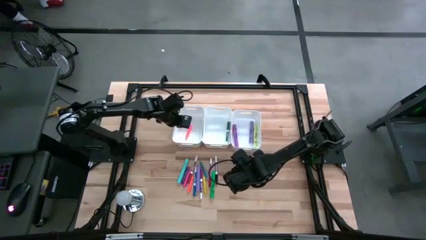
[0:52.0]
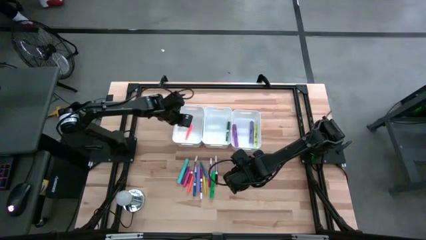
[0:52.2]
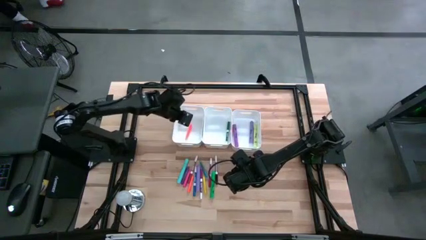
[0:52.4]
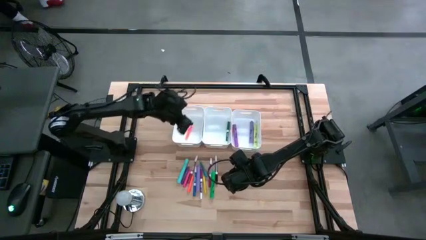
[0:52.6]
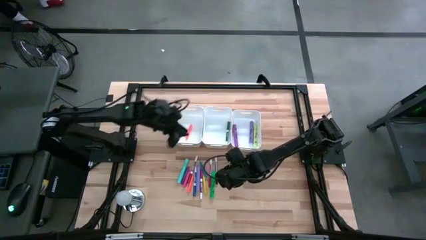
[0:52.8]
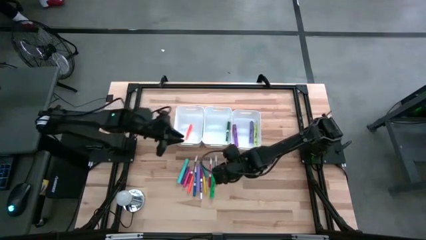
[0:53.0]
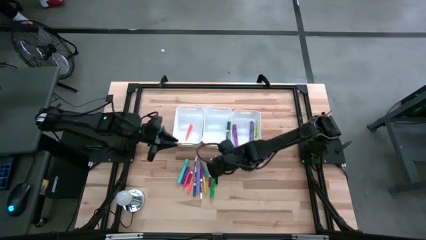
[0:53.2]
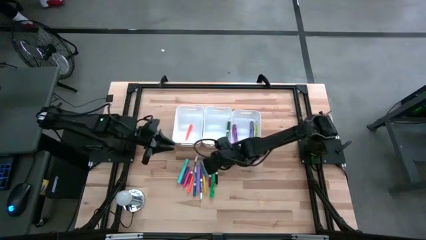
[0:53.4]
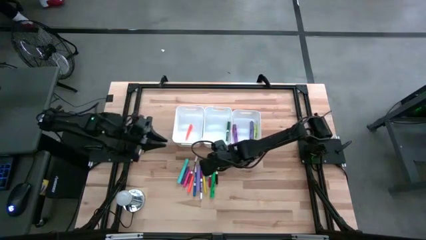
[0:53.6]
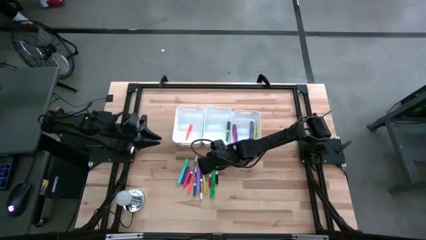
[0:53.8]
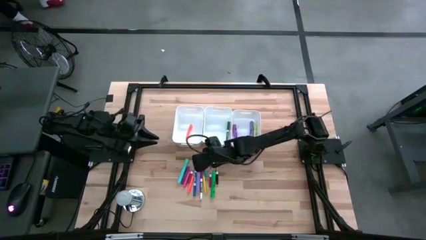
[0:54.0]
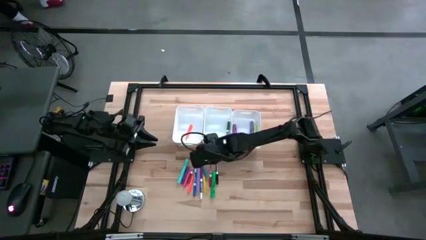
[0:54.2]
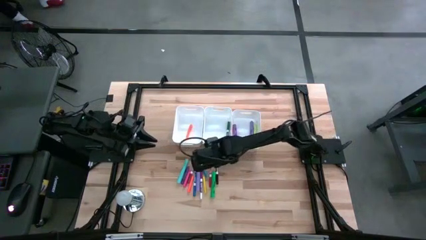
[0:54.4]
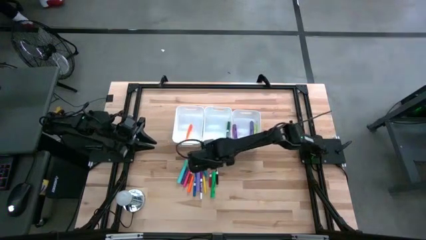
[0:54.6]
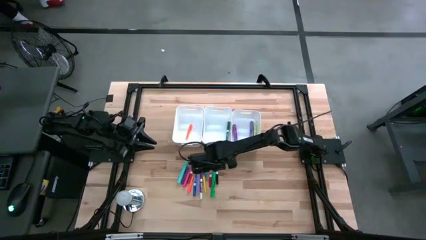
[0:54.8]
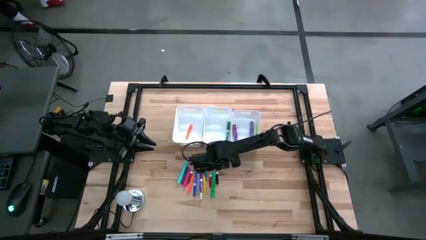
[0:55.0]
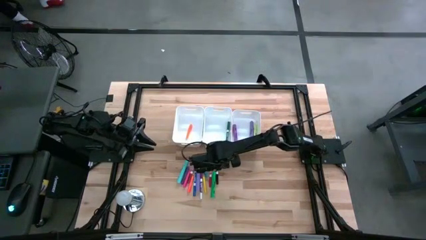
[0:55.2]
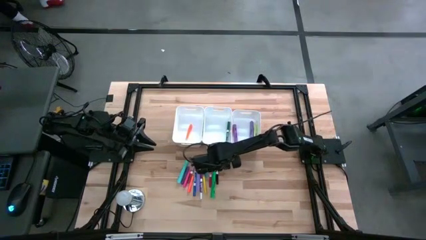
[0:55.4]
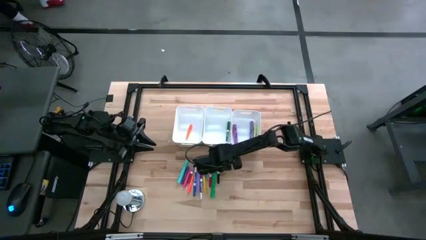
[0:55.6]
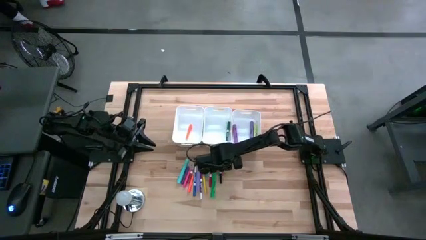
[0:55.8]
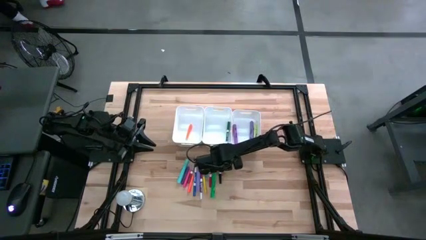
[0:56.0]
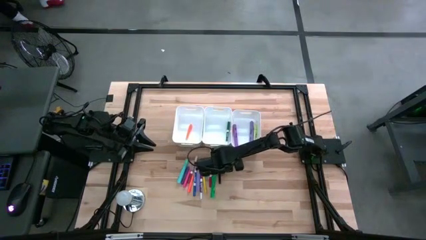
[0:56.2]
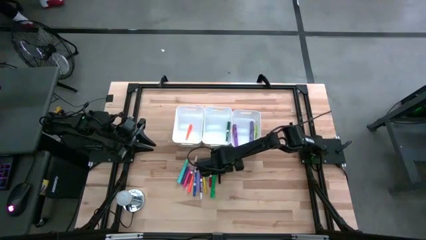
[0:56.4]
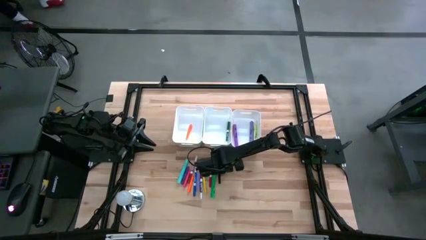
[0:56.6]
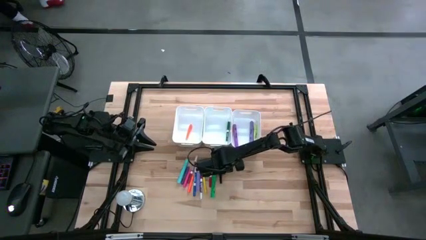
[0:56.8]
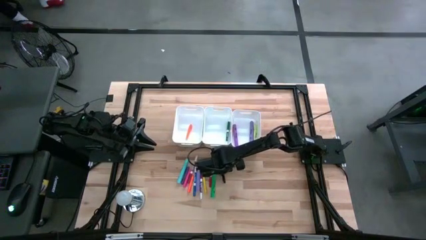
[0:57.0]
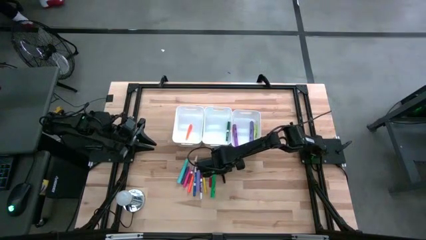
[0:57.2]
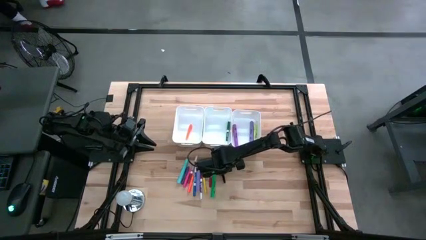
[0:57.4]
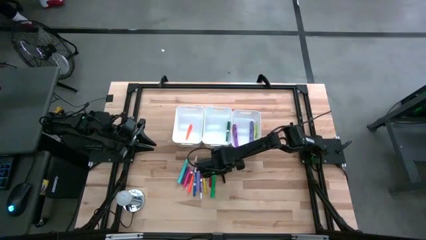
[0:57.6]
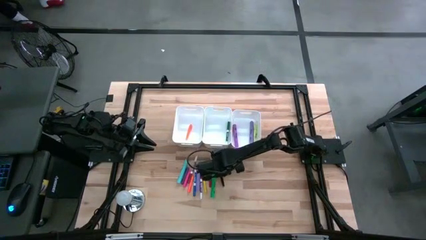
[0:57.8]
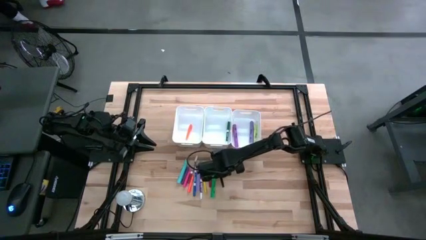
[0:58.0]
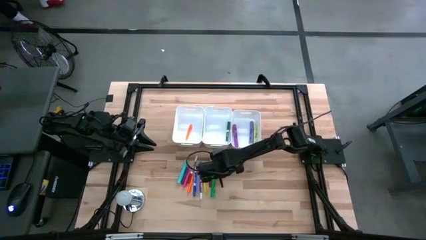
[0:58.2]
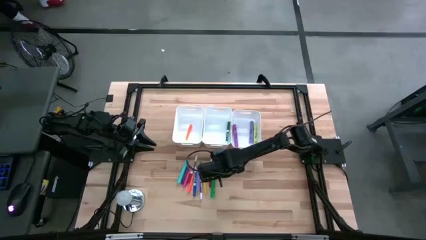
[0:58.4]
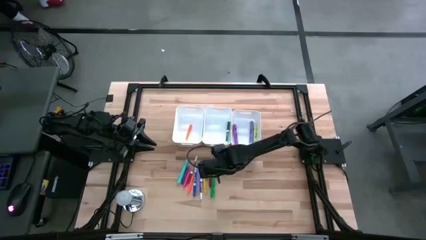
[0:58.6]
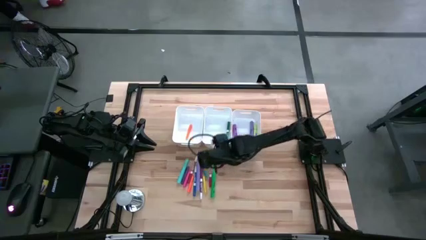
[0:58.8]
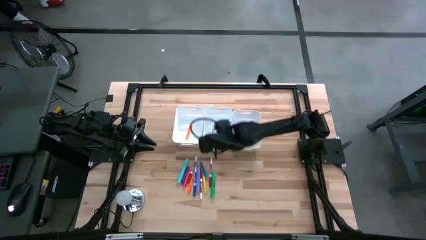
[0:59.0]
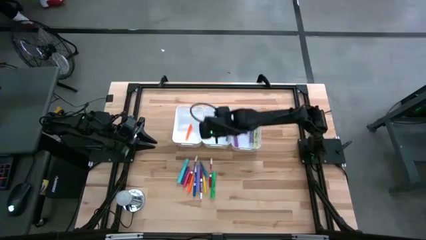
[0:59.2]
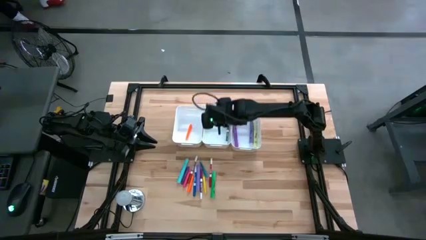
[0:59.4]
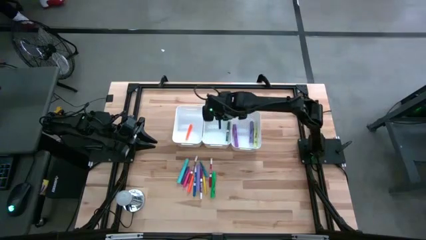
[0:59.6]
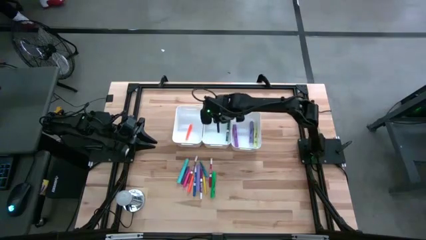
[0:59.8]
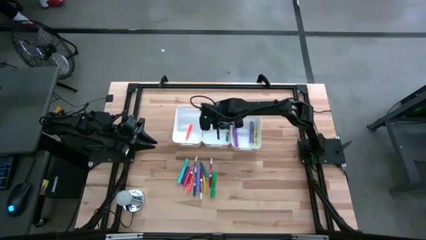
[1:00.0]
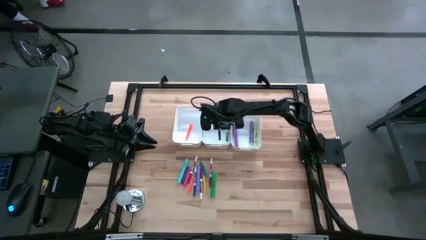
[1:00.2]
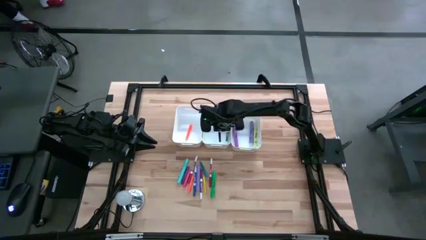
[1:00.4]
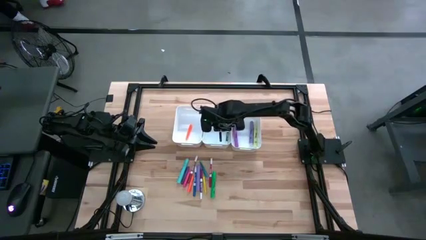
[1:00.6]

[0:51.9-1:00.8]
Task: Pick & Place Markers
Put the black marker into the middle white bin

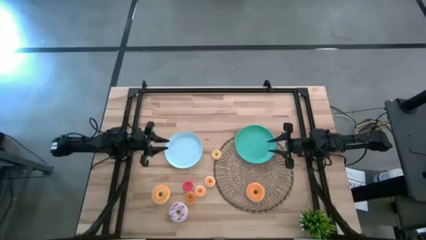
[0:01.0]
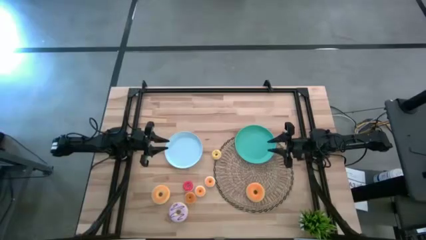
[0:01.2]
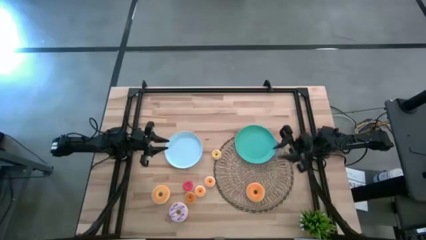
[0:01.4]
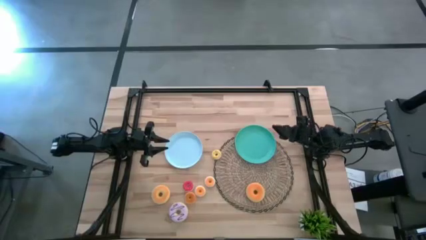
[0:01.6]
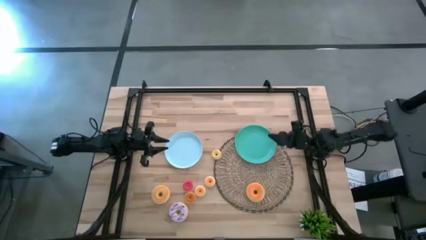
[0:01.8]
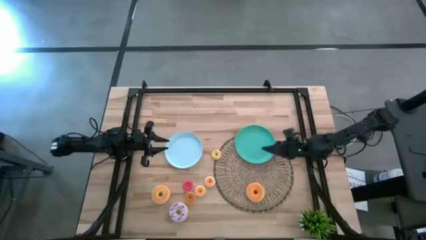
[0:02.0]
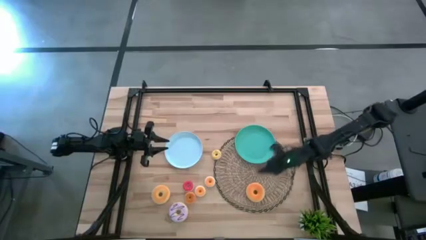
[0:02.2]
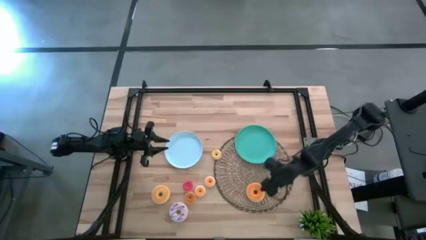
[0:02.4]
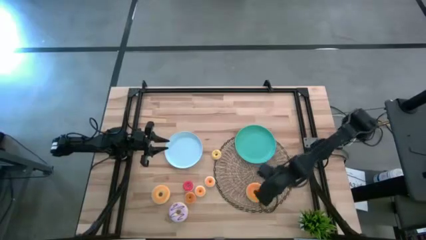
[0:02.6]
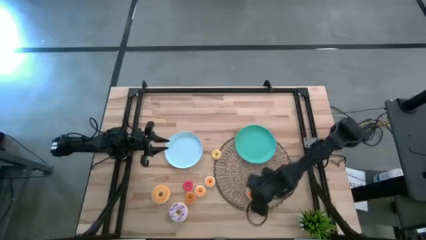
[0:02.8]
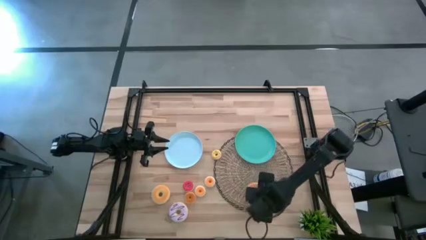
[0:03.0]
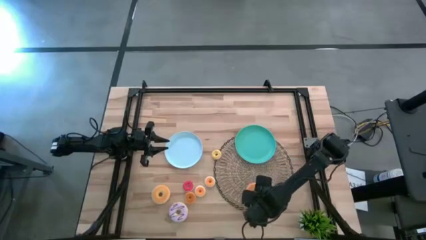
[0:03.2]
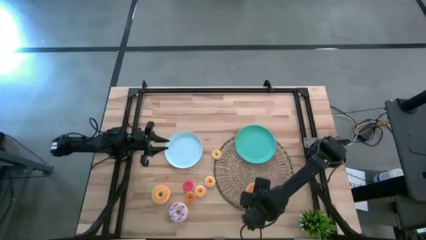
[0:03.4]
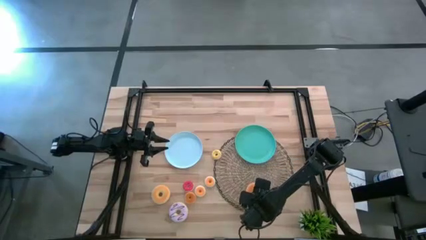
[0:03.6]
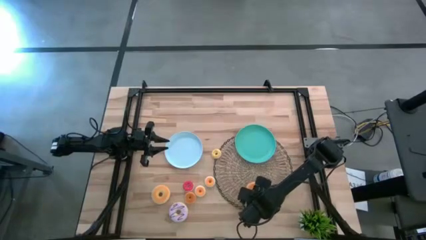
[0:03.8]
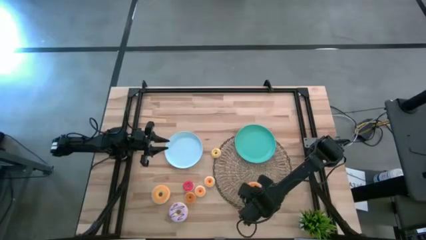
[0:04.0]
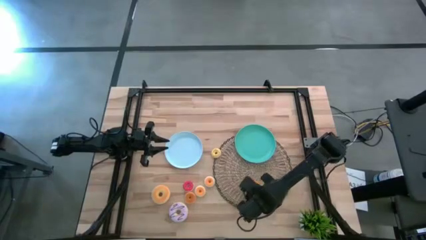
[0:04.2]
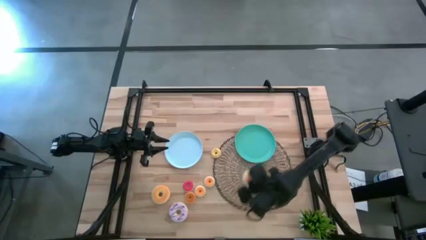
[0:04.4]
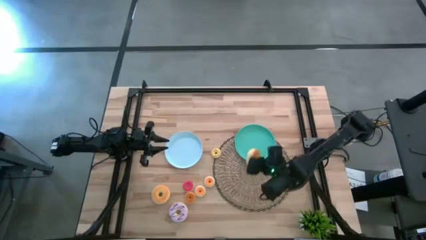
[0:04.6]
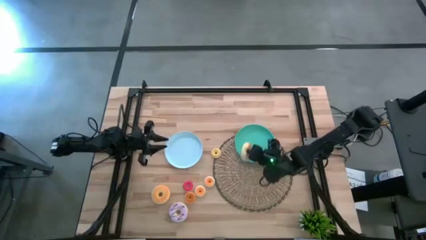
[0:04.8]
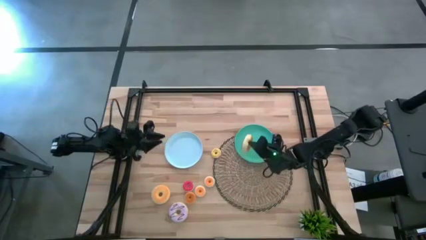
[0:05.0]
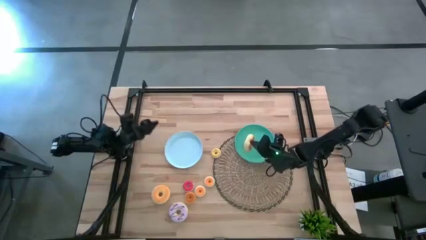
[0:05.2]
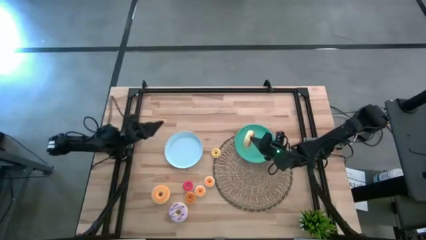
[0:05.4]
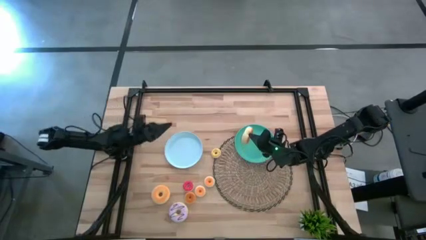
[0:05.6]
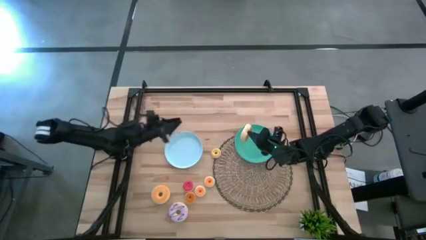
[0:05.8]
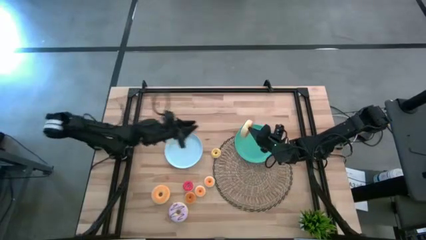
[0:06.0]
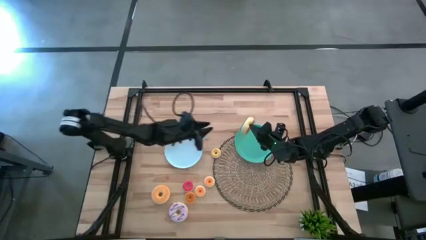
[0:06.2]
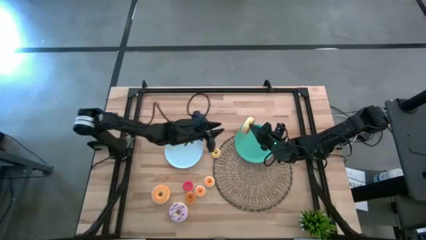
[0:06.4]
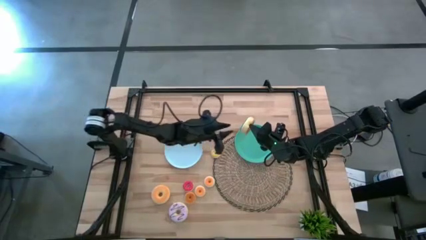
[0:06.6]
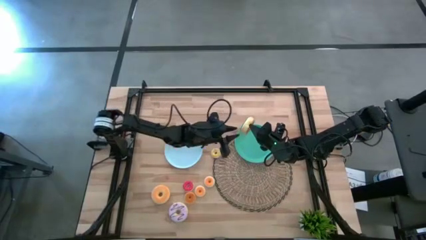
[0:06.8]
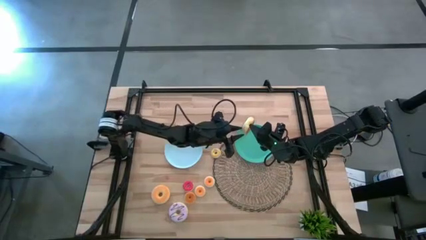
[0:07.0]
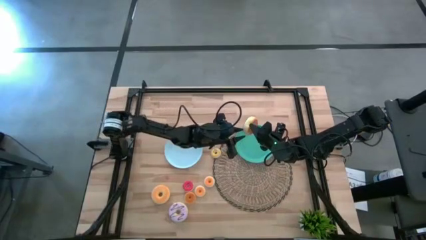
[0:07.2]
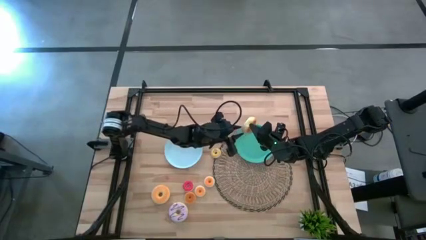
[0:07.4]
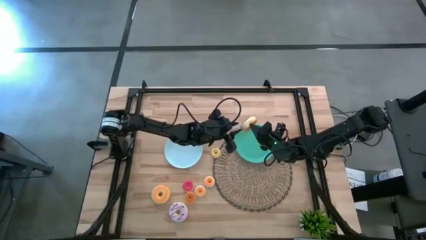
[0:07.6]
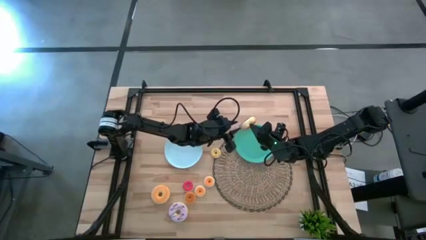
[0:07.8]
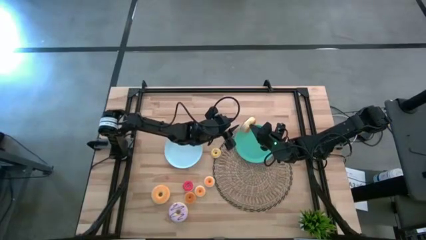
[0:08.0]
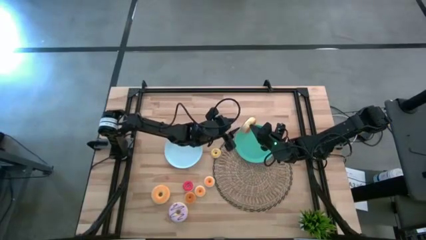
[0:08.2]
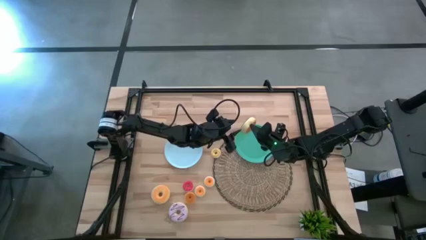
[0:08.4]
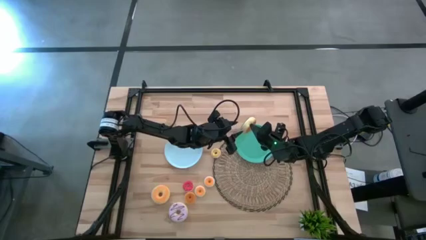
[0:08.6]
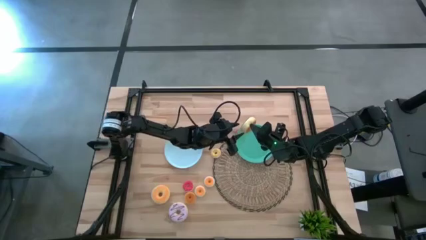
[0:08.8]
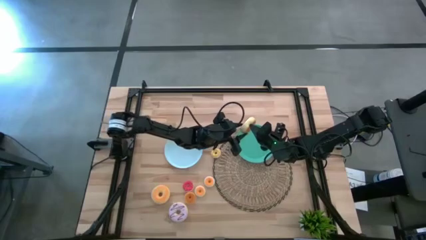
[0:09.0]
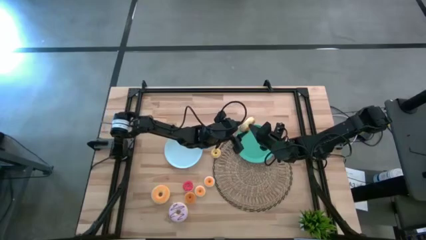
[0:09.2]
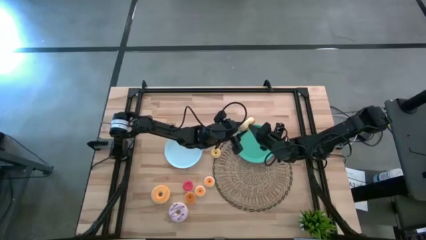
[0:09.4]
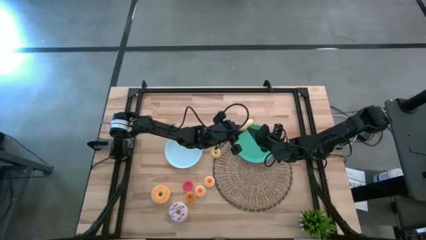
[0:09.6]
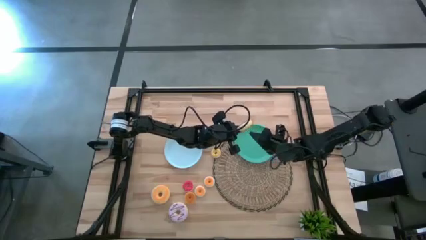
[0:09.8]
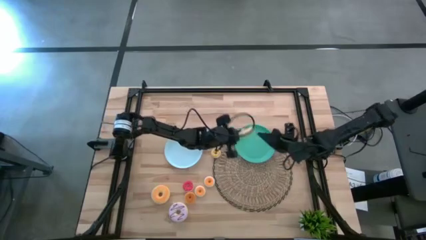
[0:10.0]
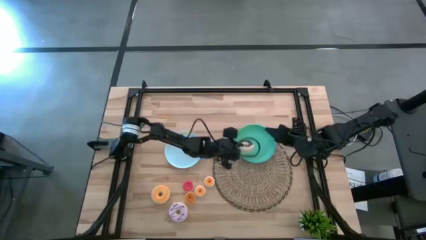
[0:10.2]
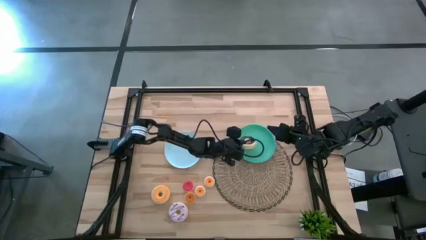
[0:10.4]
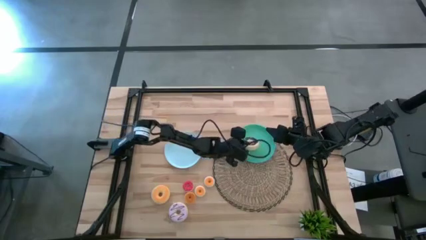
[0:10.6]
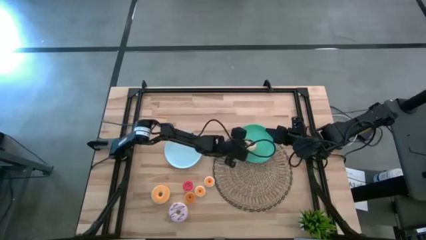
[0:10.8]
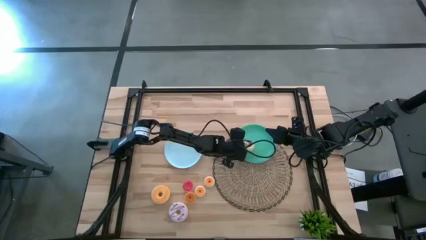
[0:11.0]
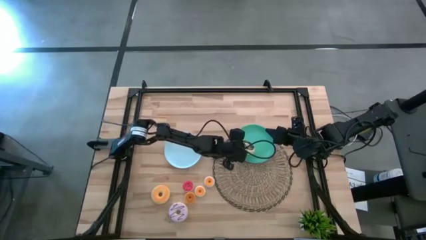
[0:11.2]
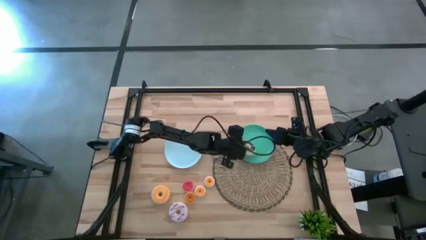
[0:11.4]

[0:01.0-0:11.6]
Task: Pick & Place donuts
Put the black doughnut on the green plate
